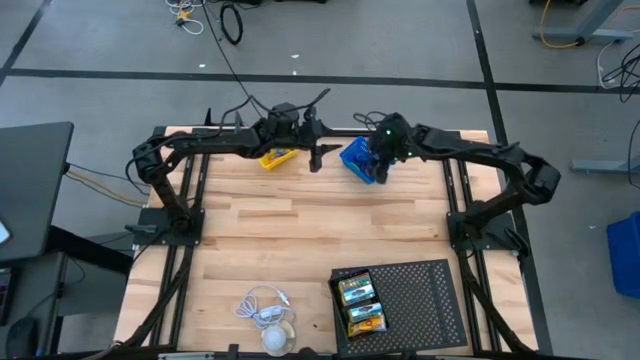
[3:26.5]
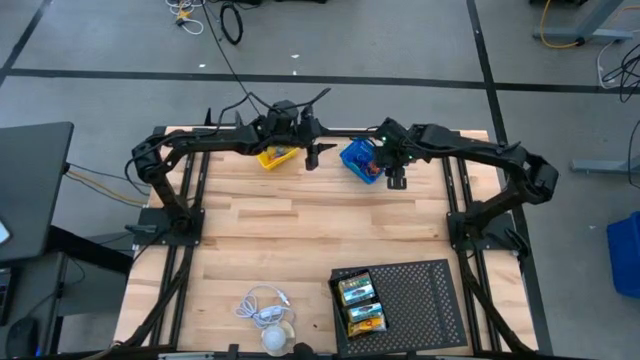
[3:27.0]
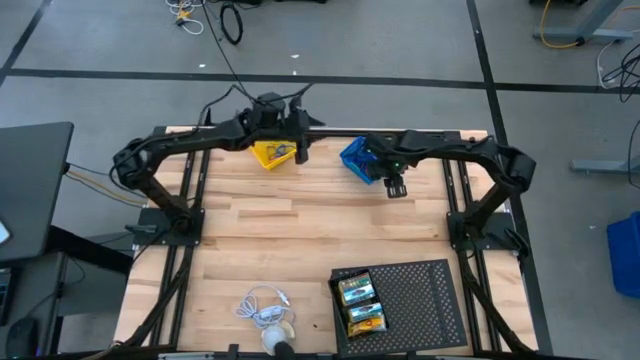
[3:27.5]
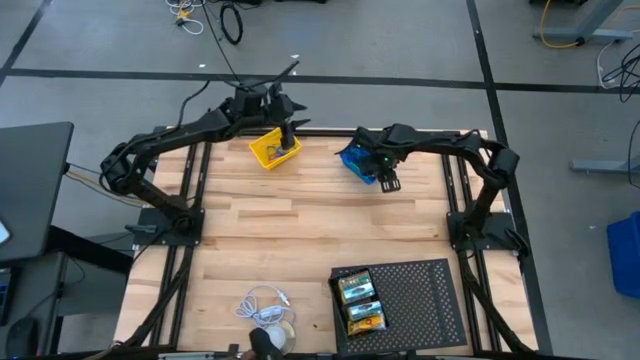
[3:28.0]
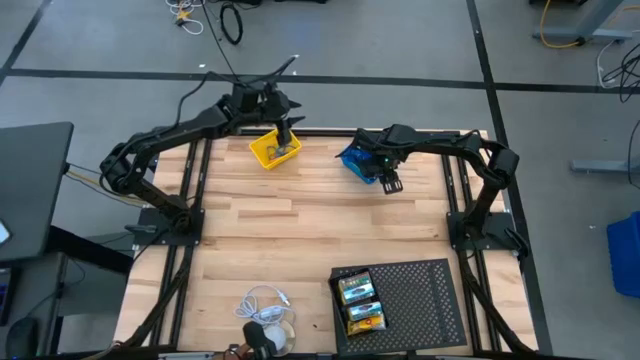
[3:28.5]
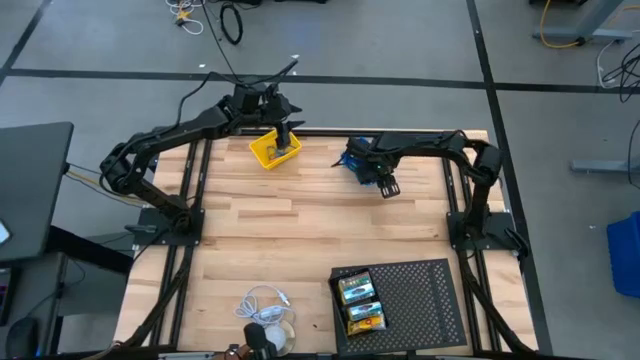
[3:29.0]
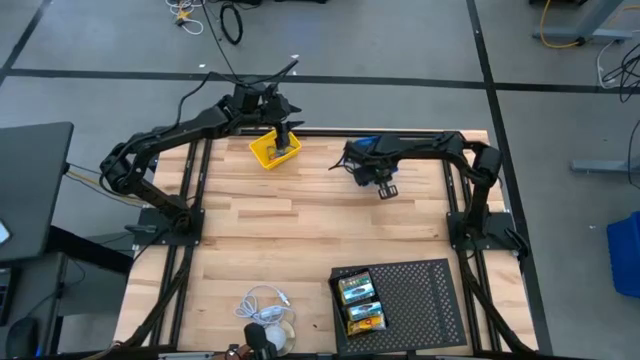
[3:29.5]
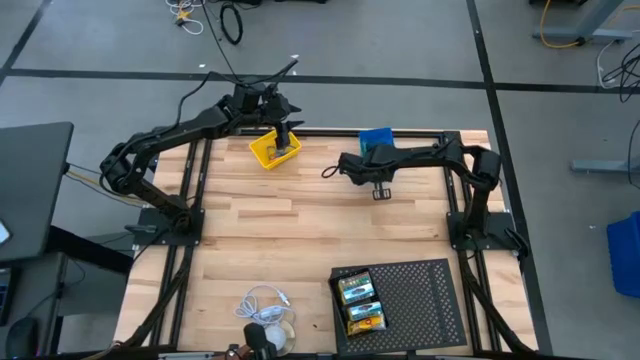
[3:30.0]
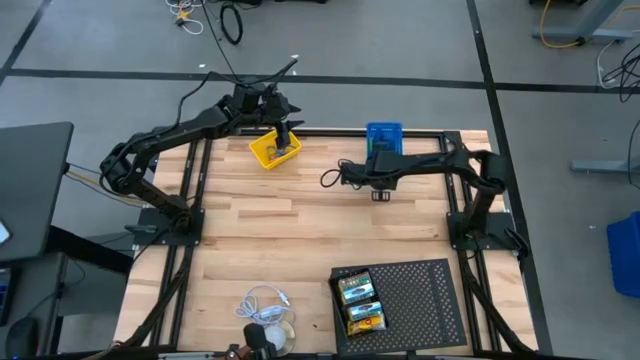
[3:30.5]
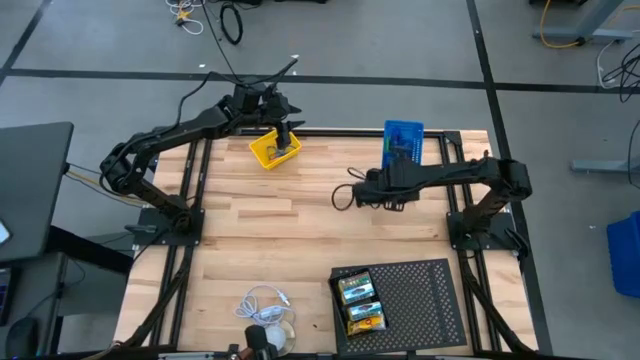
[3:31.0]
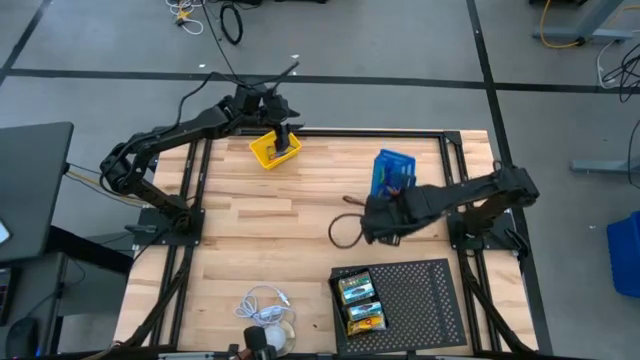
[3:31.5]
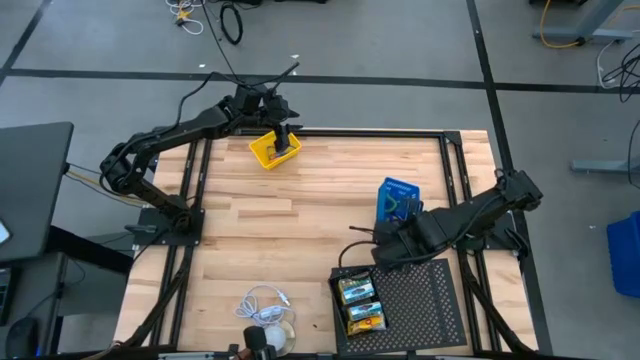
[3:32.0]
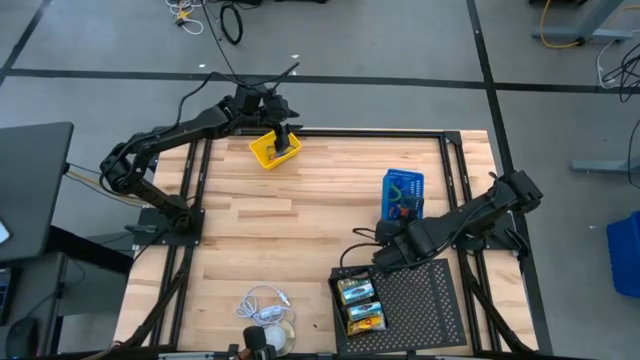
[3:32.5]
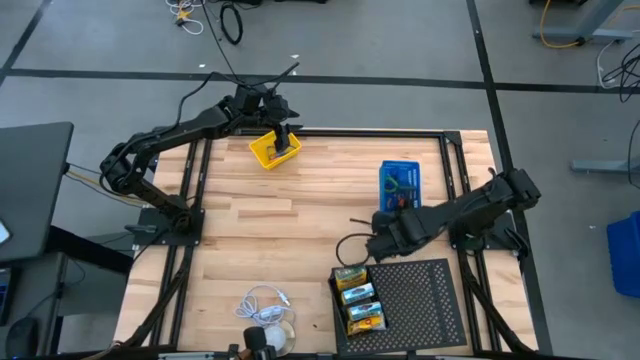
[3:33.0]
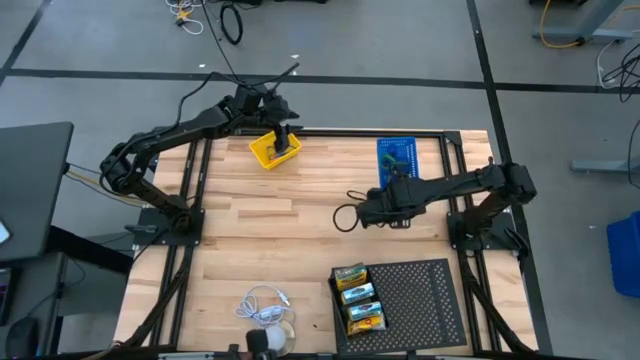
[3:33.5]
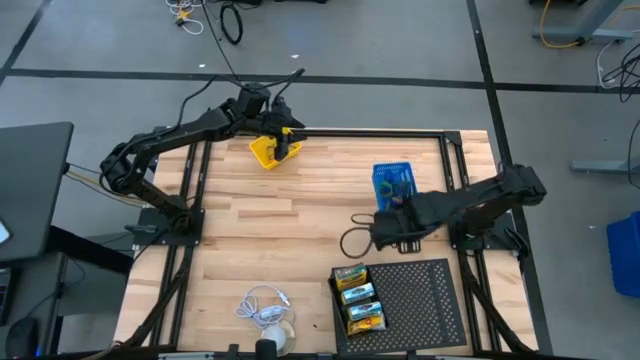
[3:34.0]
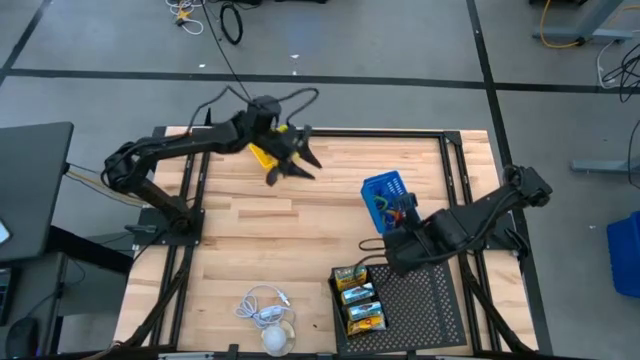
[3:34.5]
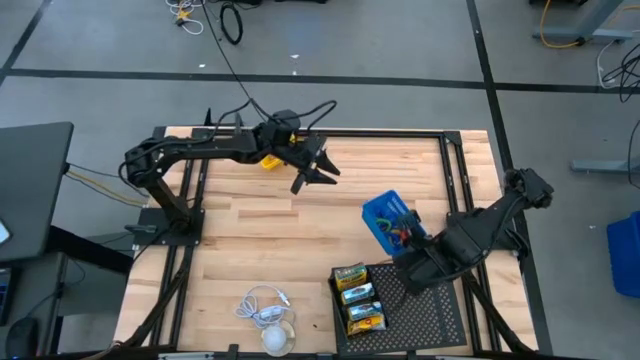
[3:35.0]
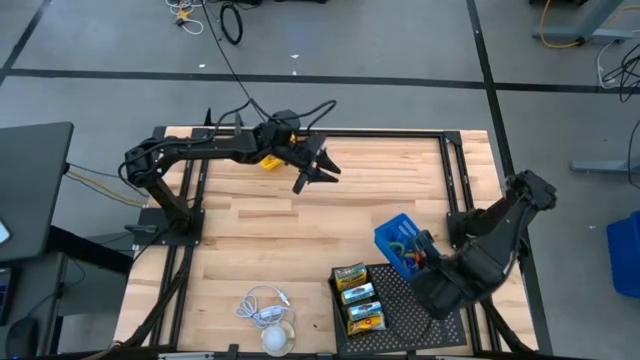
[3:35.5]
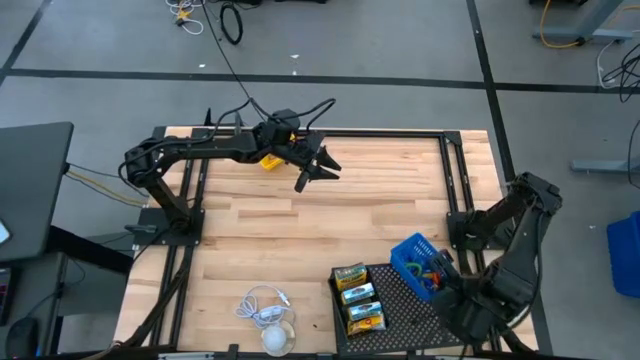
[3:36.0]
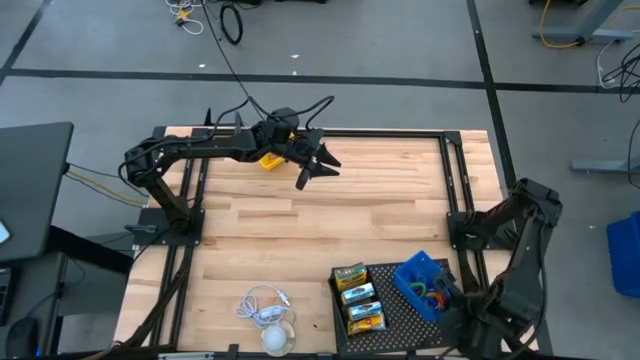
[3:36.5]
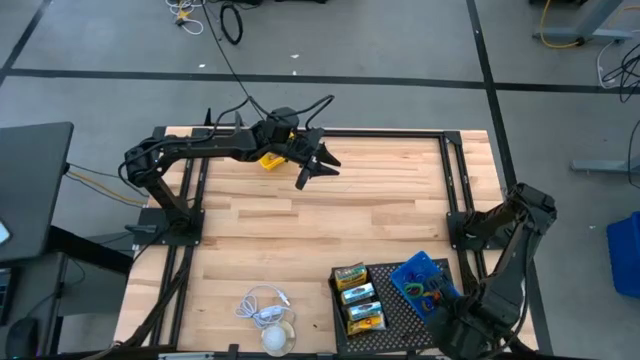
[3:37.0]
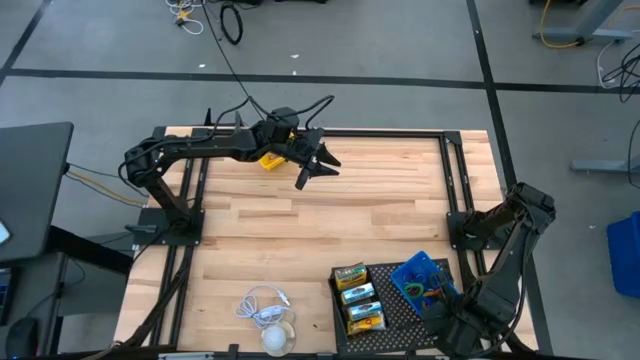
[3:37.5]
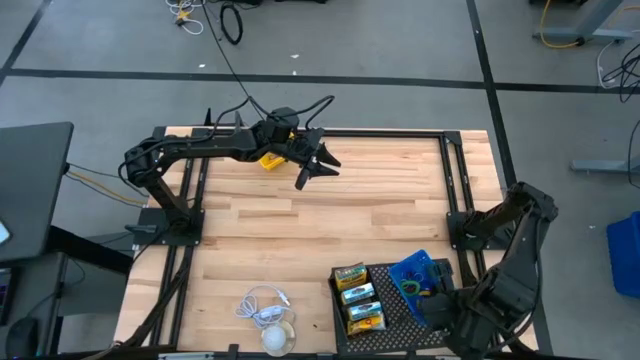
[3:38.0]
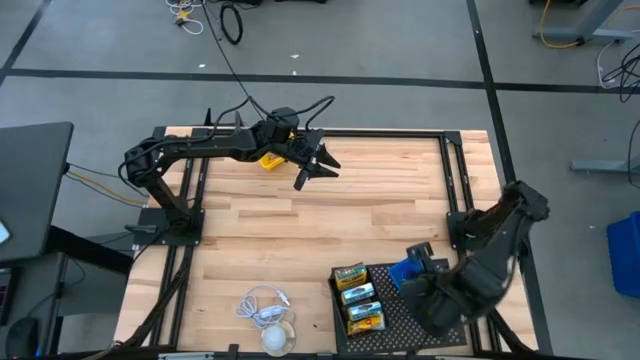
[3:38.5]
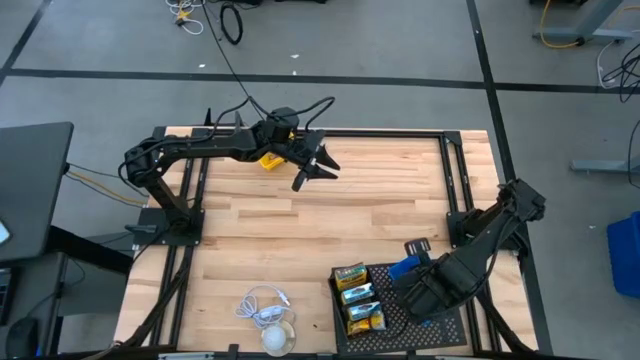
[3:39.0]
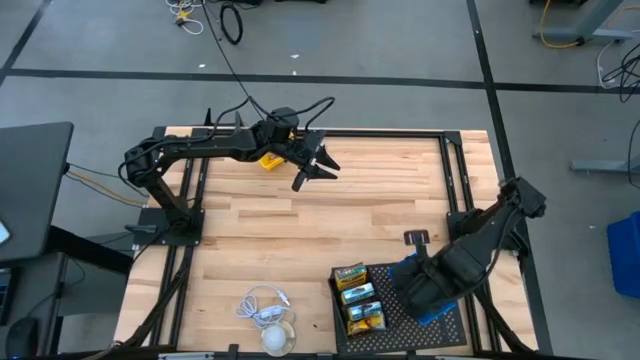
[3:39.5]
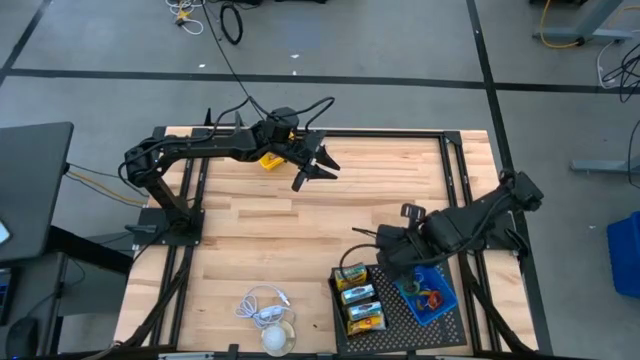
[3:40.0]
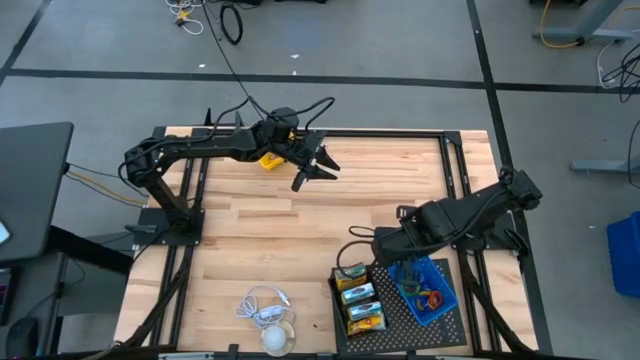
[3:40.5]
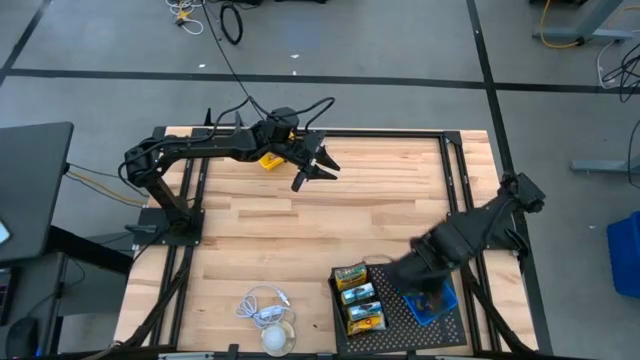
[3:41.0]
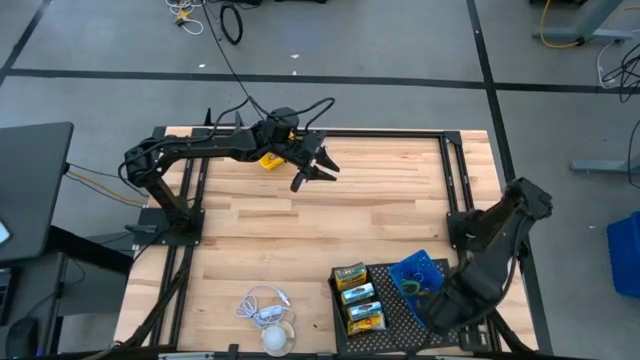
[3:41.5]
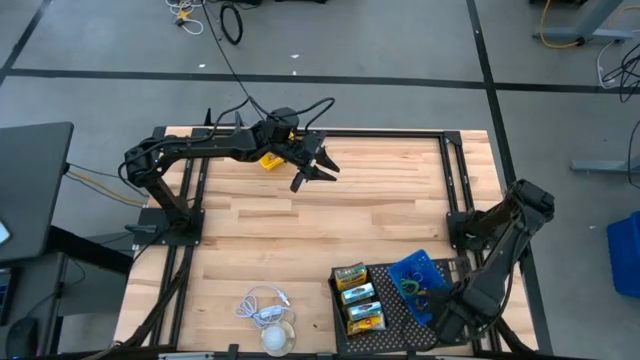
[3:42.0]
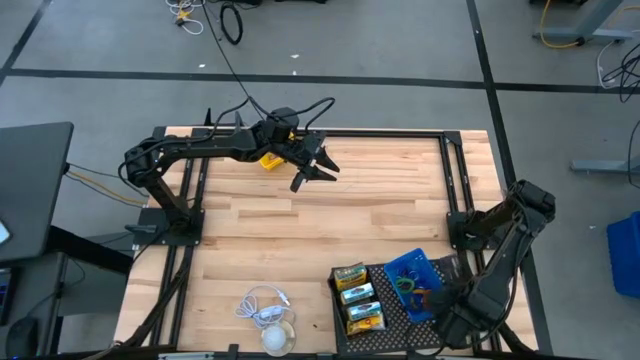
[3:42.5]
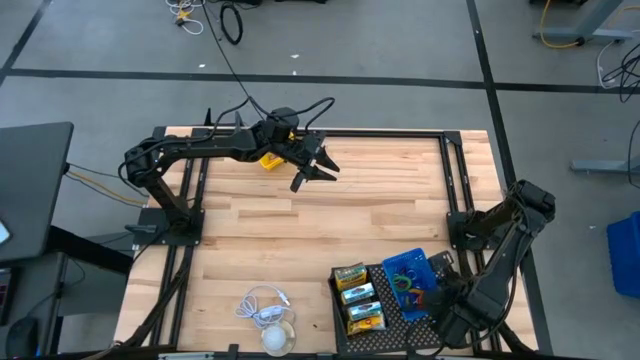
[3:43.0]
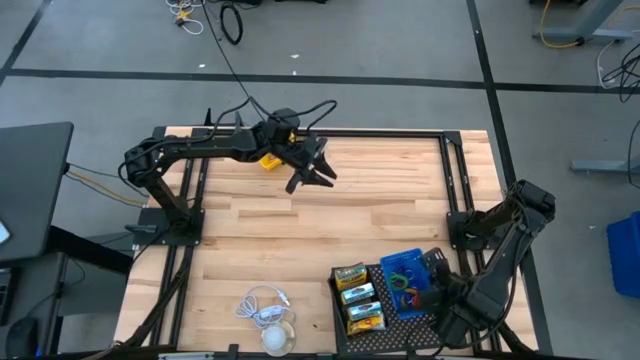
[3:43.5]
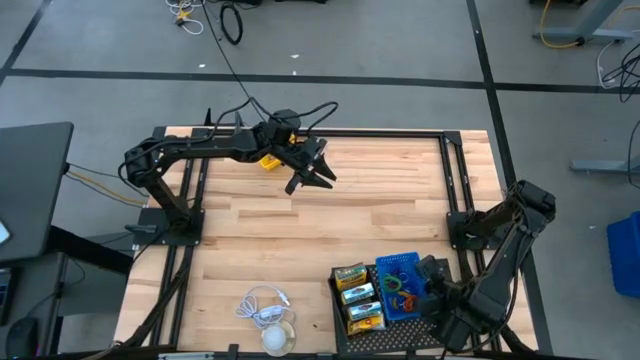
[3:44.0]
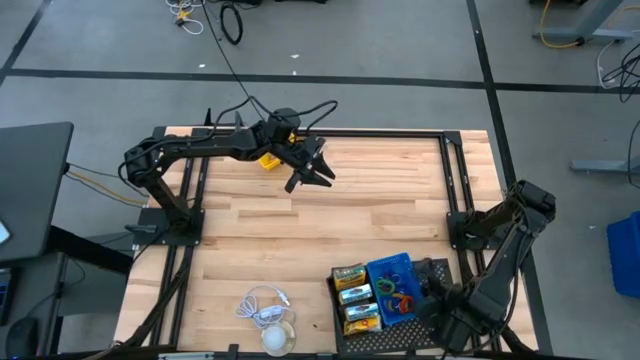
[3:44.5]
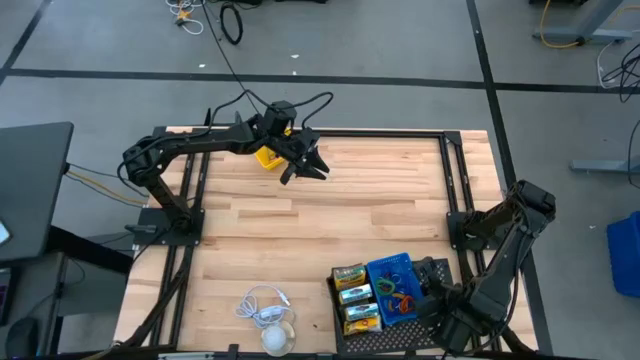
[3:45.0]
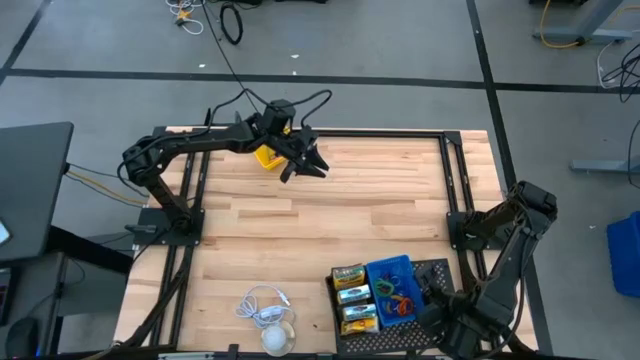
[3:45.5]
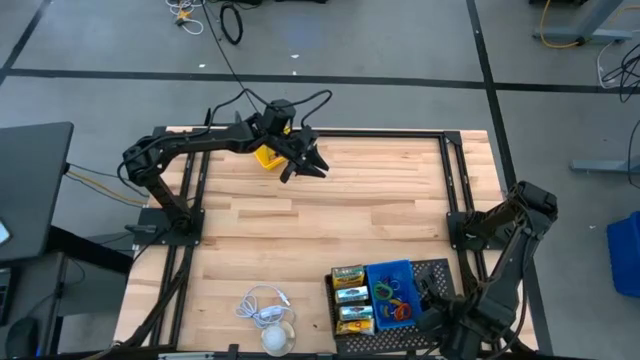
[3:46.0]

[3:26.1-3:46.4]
Task: Pick & Place Office Desk Supplies
Put the blue basket filled with spring keychains on the shelf

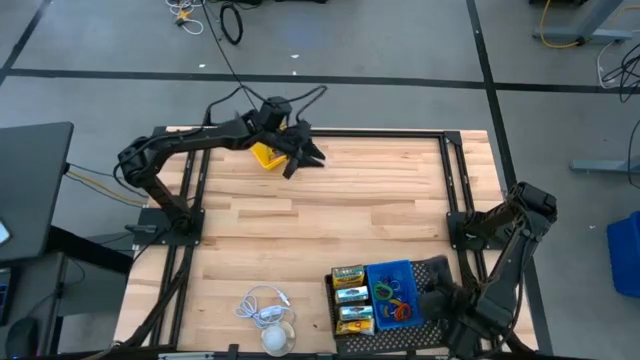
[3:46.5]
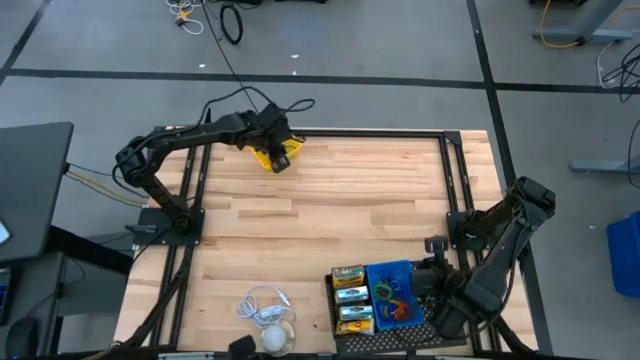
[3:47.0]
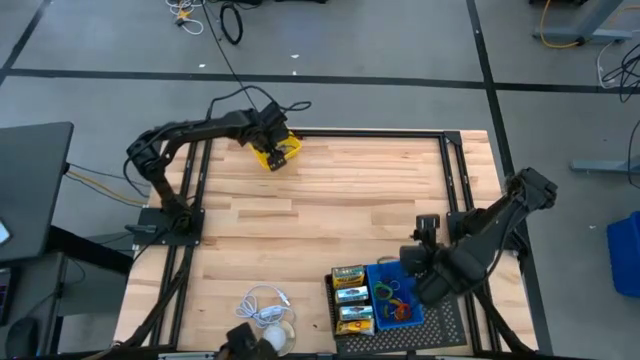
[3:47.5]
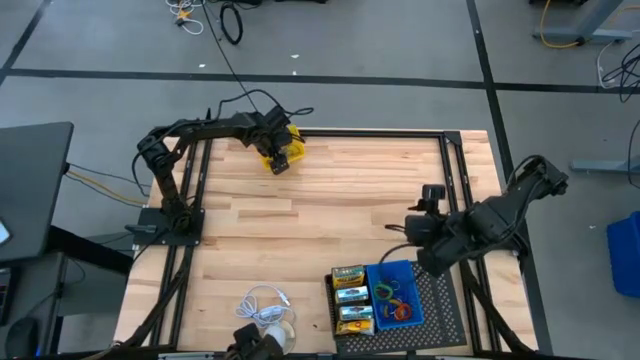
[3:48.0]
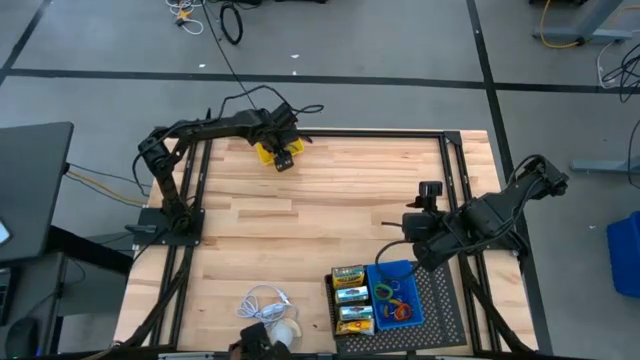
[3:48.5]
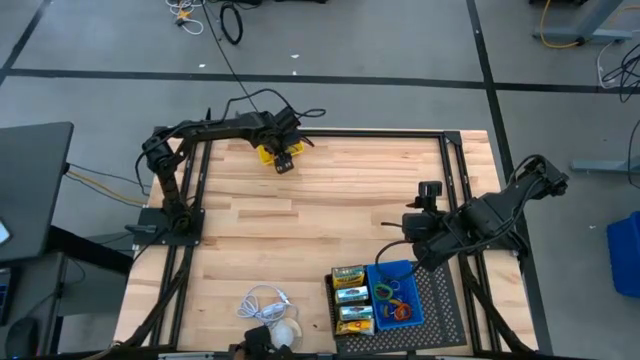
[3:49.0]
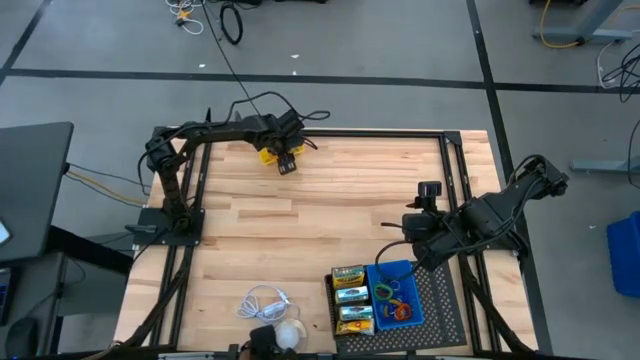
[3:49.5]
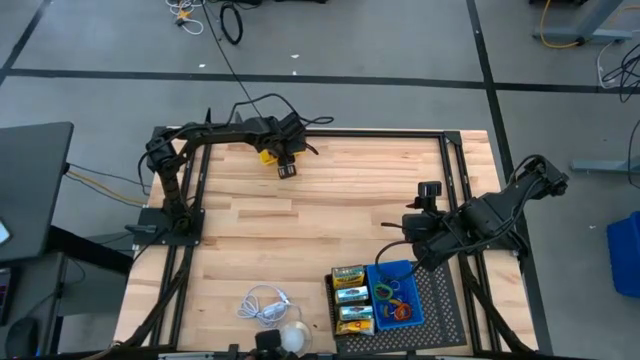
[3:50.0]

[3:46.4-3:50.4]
Put the yellow basket filled with rubber bands on the shelf
